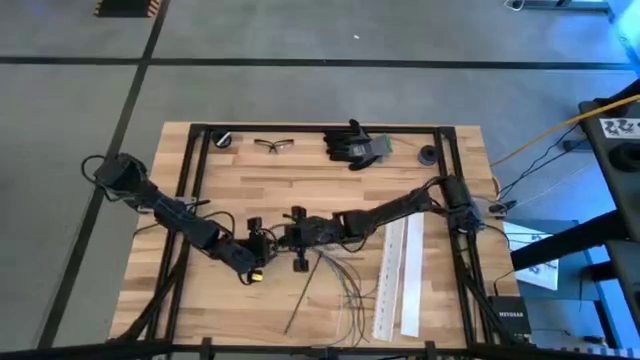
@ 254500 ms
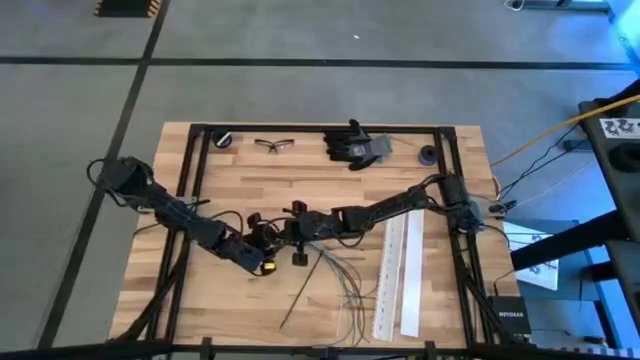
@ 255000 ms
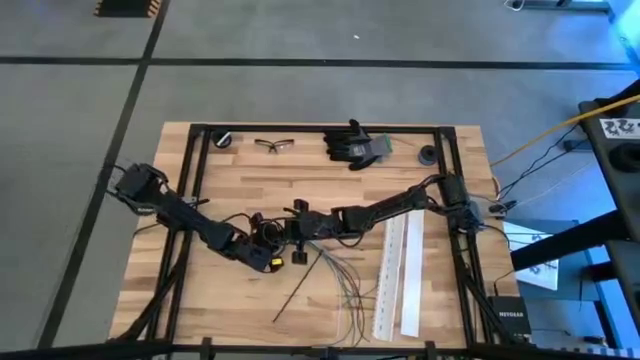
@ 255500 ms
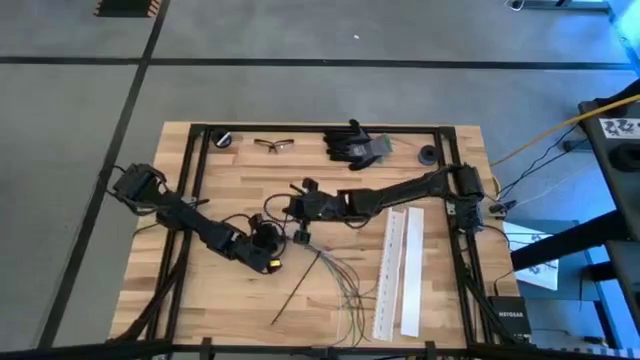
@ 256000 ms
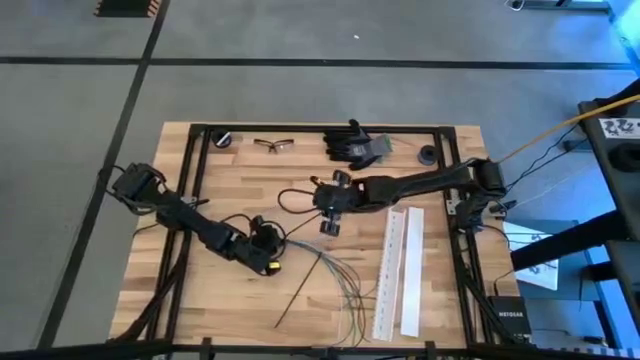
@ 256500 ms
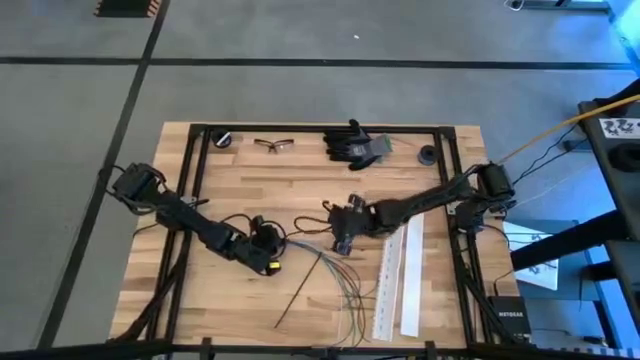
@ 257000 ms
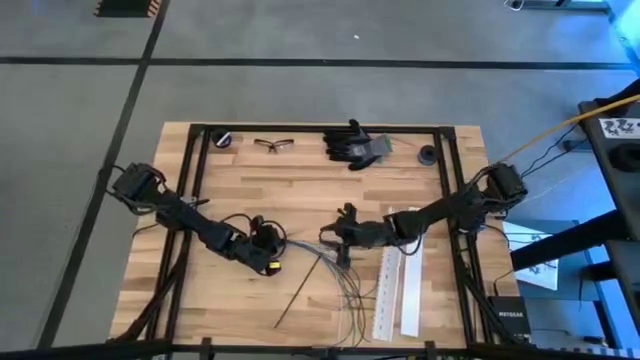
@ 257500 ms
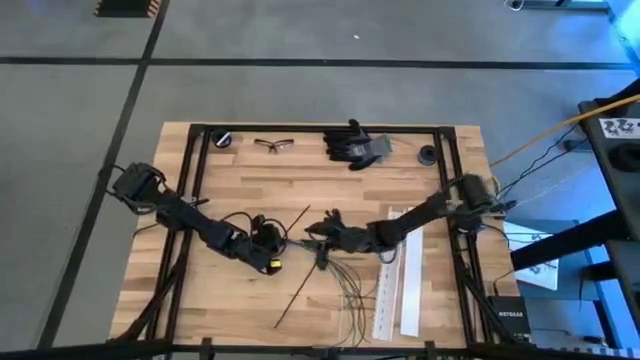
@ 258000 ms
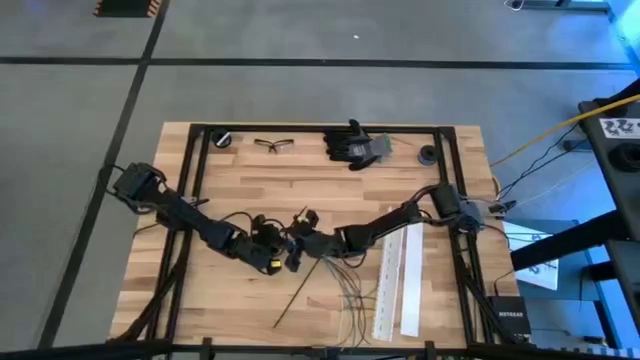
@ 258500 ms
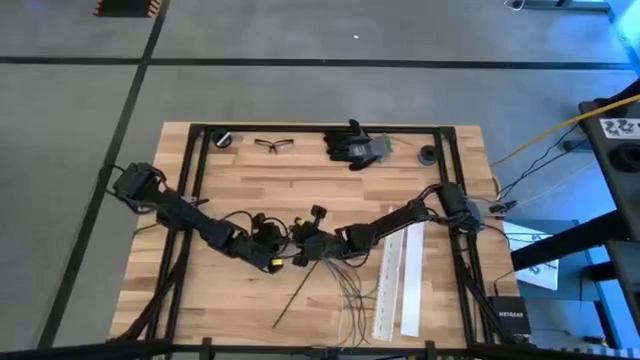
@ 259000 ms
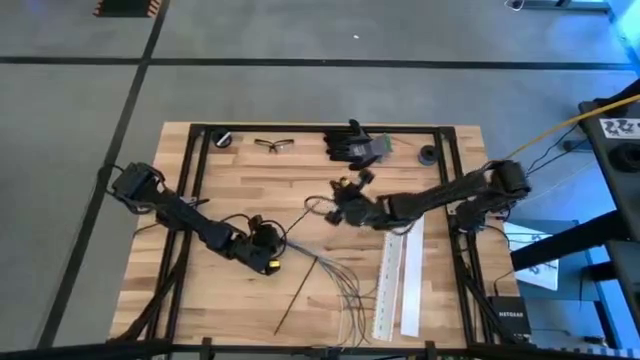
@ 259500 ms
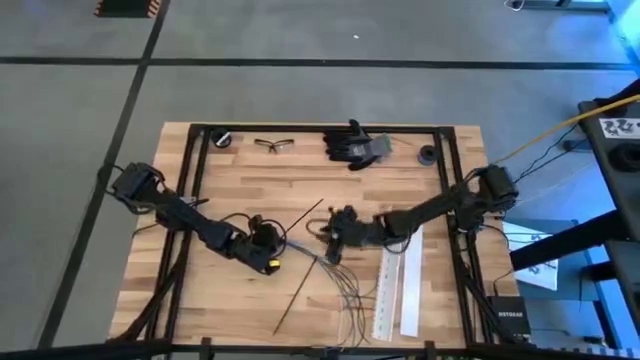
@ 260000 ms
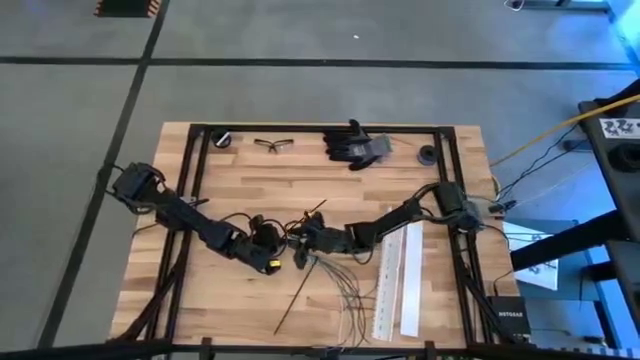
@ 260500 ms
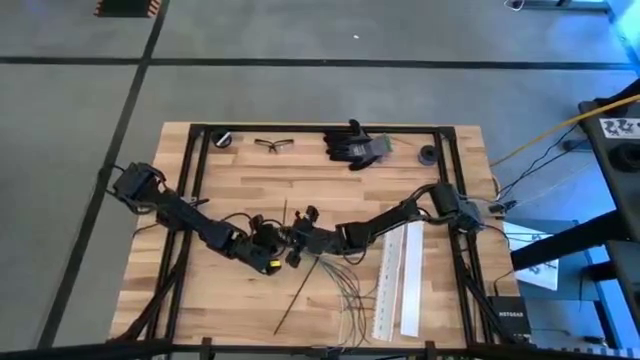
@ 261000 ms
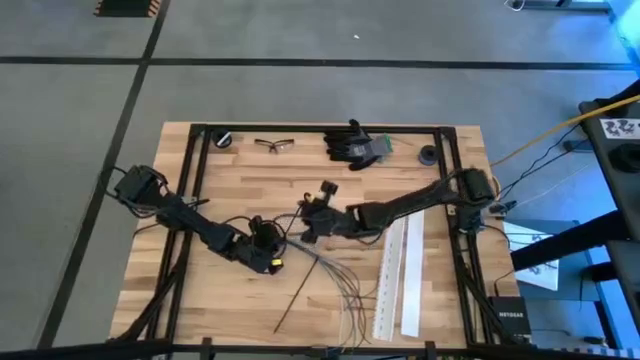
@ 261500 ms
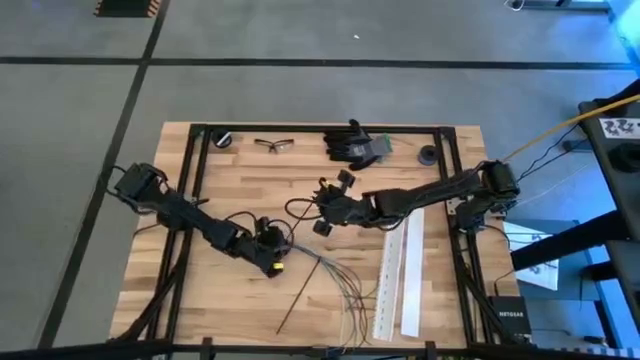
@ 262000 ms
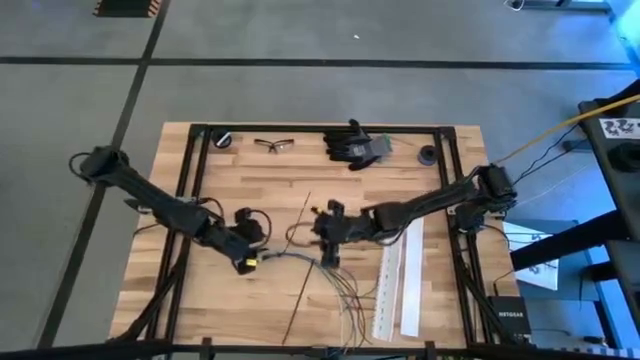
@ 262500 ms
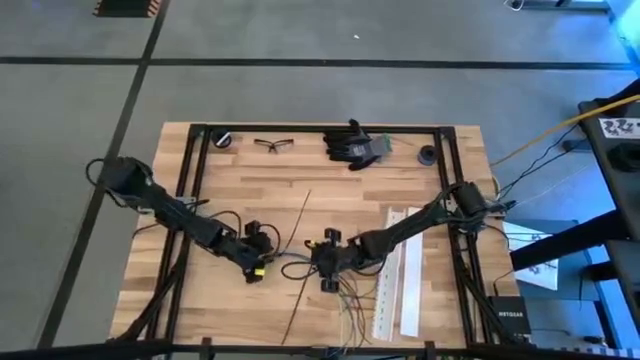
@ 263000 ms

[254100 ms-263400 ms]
Task: Ziptie cables
Wrap the zip tie on the cables

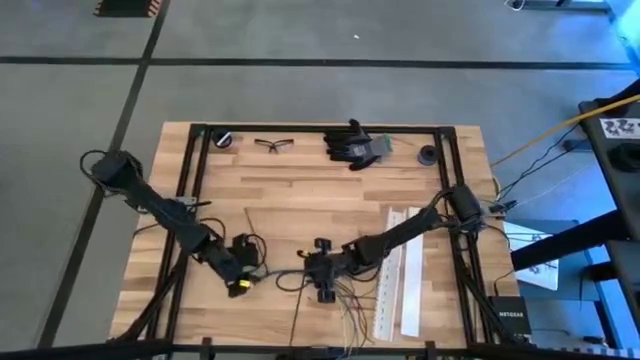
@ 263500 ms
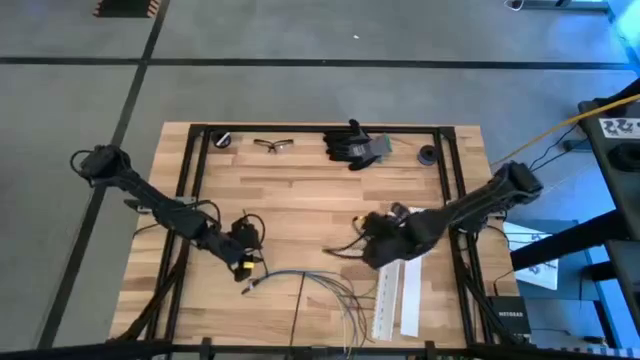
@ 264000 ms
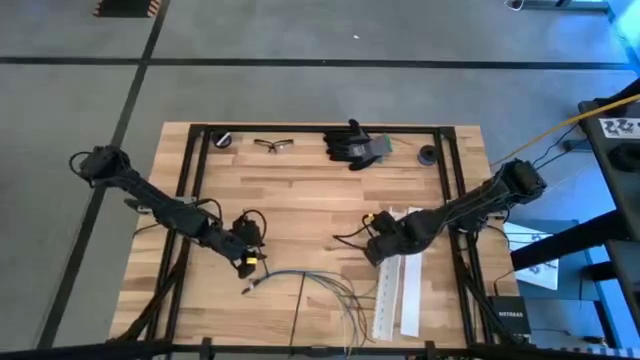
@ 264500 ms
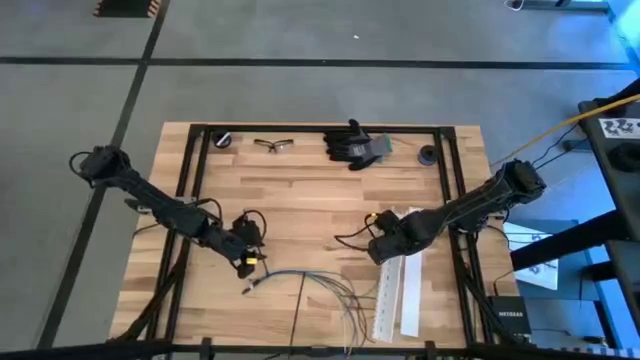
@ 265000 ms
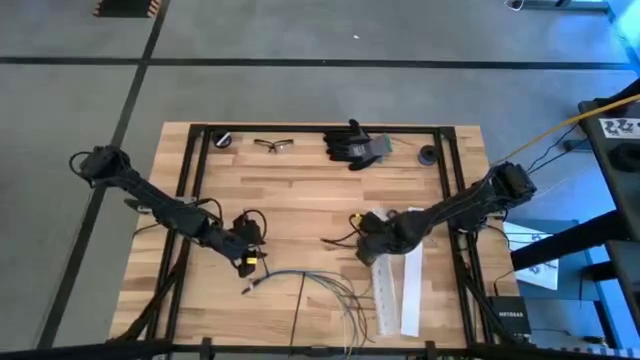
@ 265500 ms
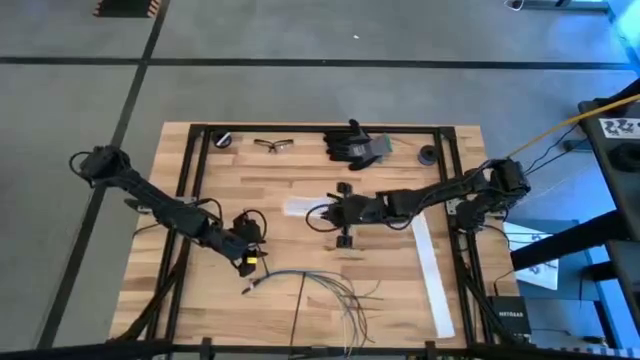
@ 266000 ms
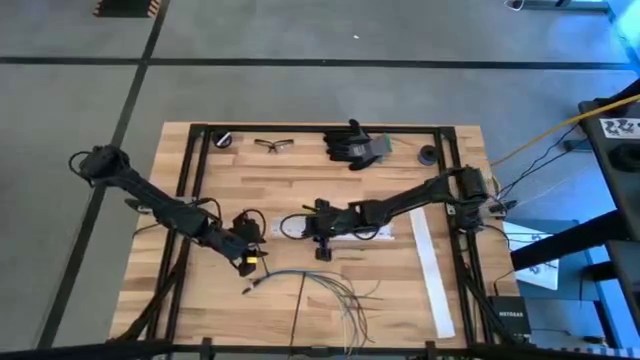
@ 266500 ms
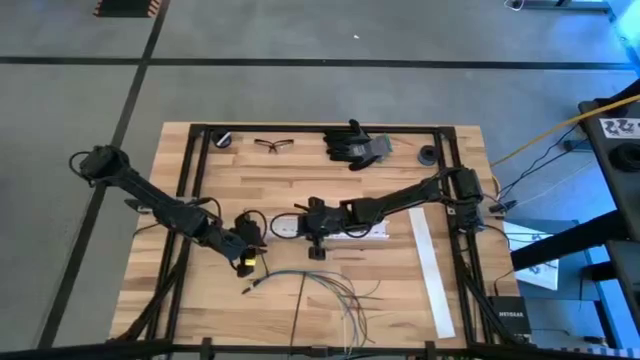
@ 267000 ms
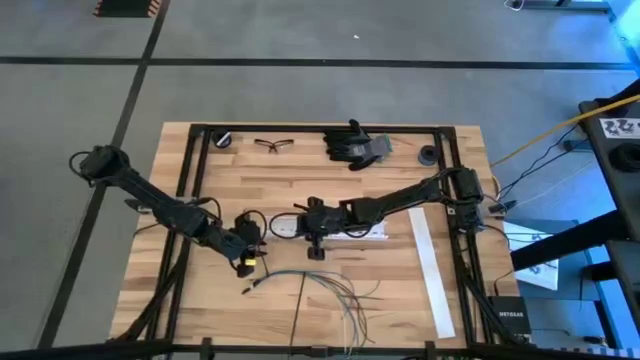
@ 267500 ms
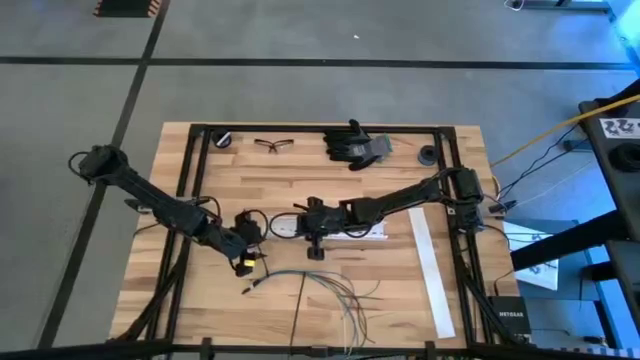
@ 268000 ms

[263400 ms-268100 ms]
Move the white cable duct to the center

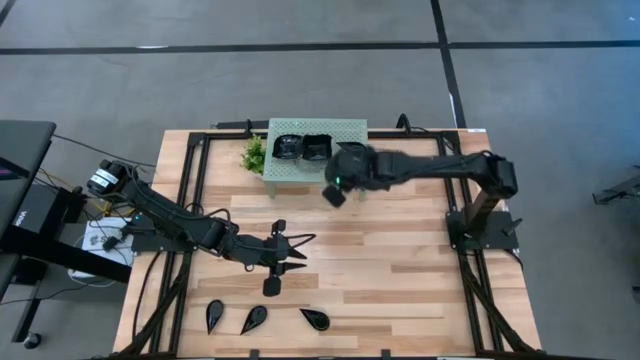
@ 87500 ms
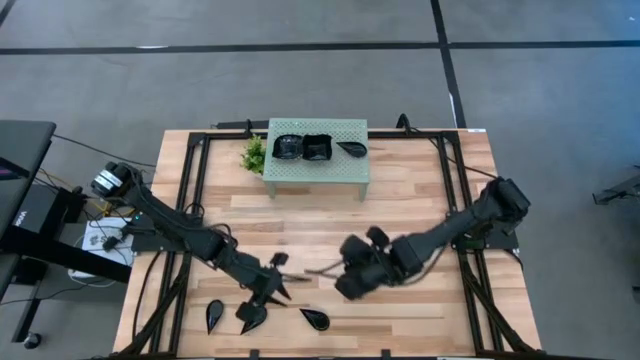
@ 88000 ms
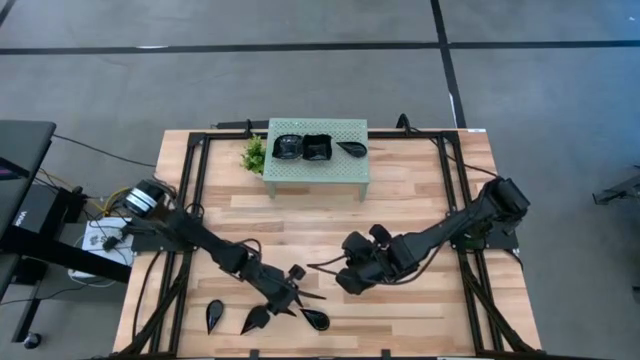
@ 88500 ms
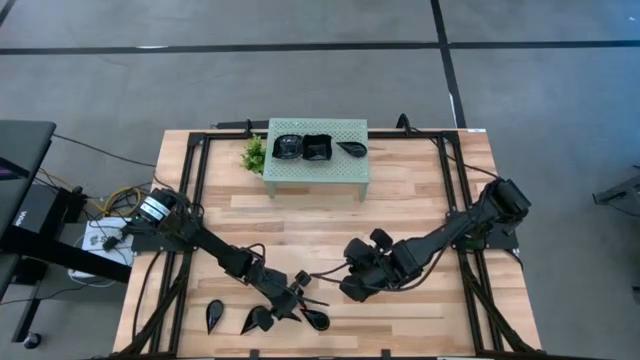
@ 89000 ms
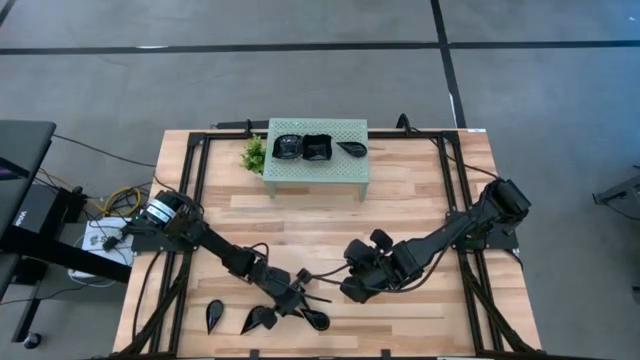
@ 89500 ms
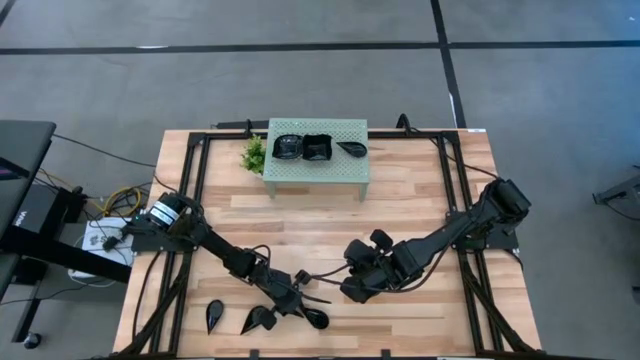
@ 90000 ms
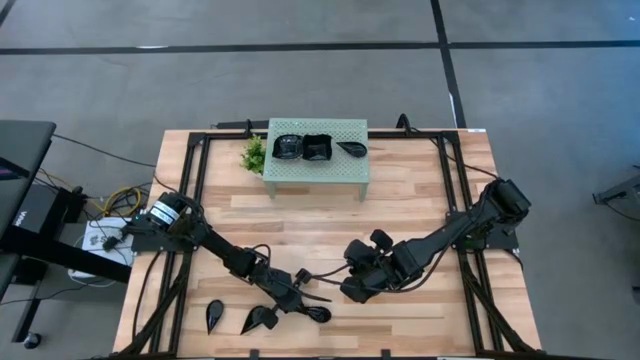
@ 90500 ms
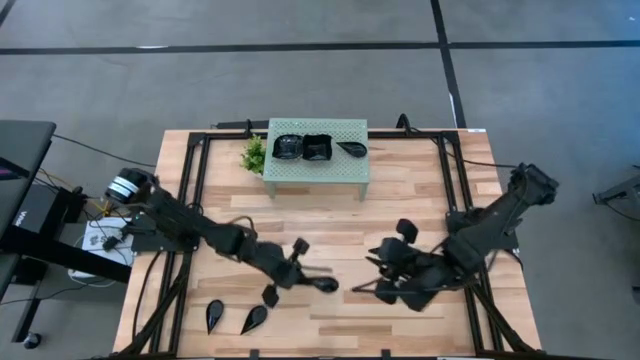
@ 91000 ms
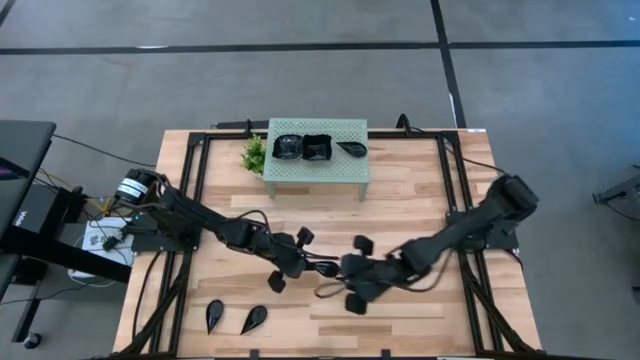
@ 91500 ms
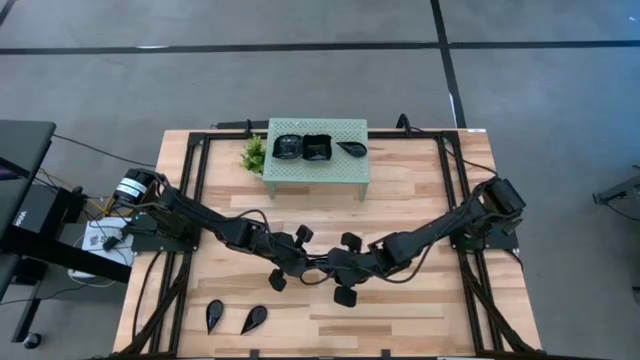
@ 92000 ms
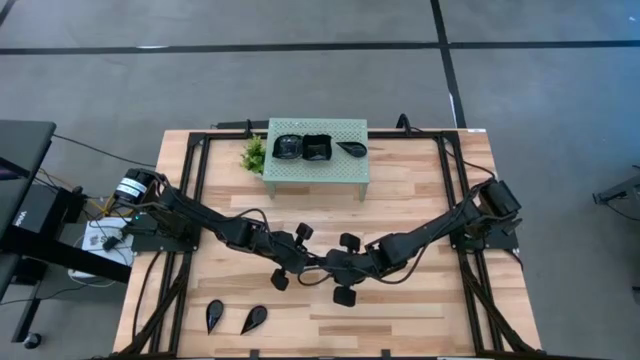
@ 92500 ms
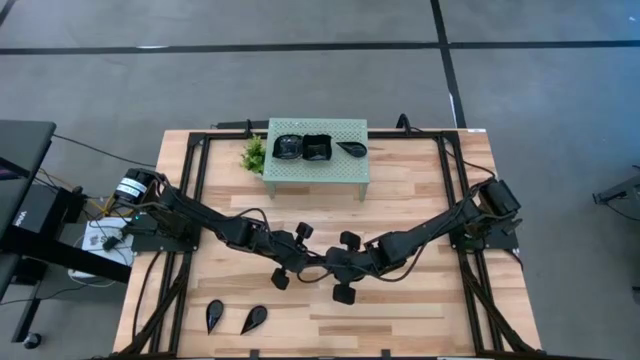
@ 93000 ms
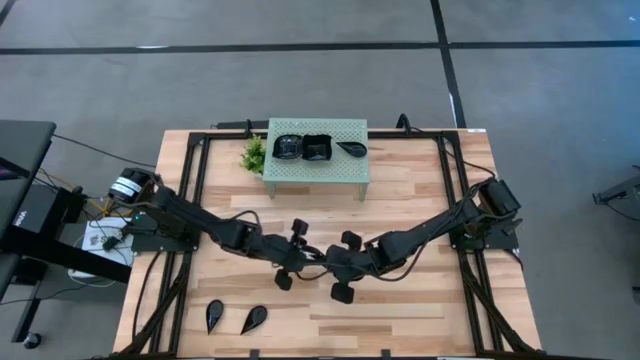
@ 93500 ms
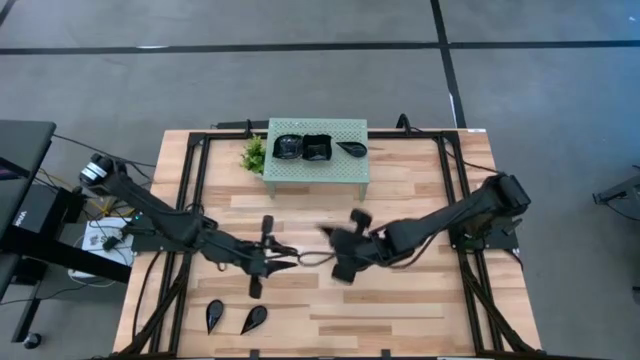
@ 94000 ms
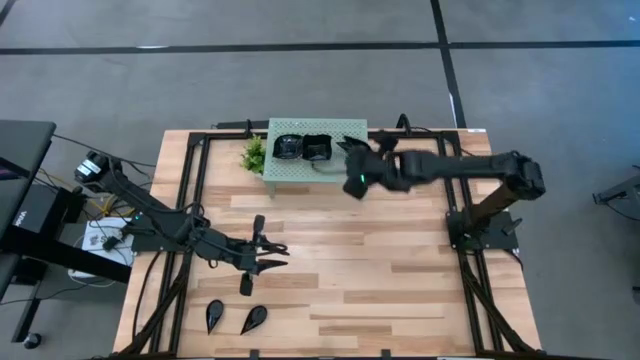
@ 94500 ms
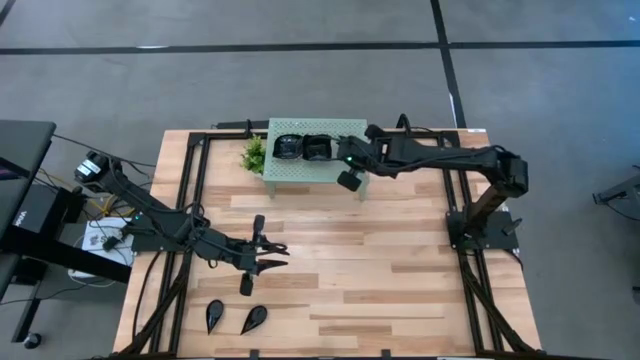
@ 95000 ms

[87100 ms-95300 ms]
Task: Pick & Place Mini shaped plates
Stack the drop-shaped plate on top of the other drop-shaped plates on the shelf
